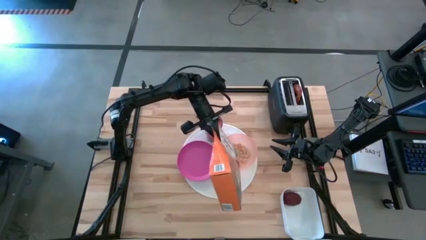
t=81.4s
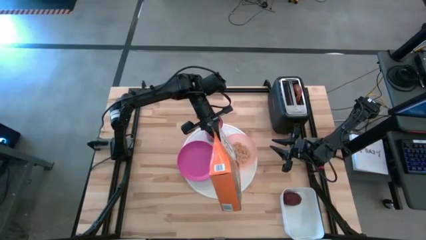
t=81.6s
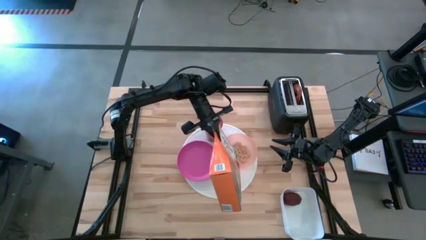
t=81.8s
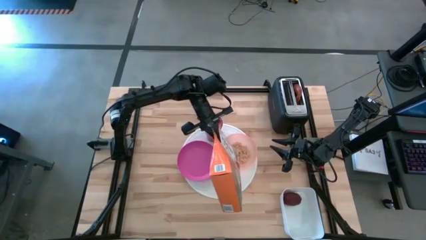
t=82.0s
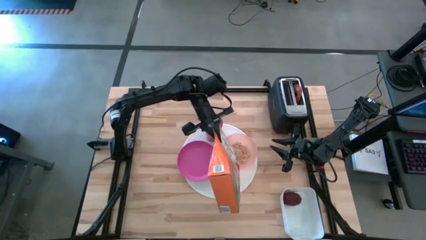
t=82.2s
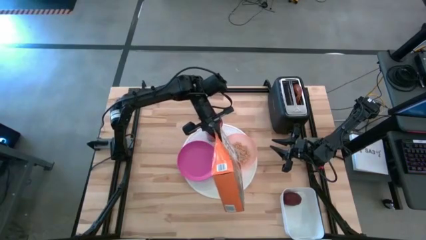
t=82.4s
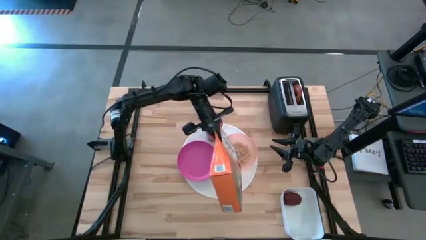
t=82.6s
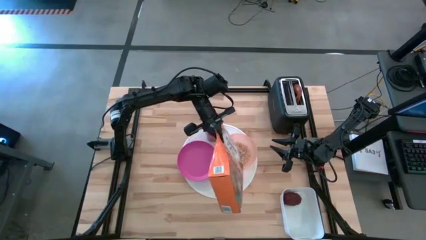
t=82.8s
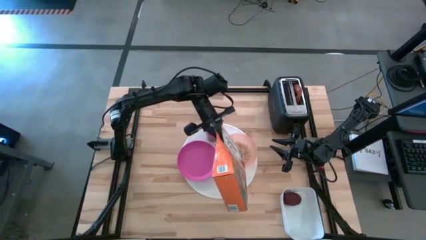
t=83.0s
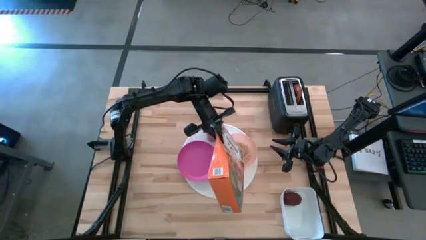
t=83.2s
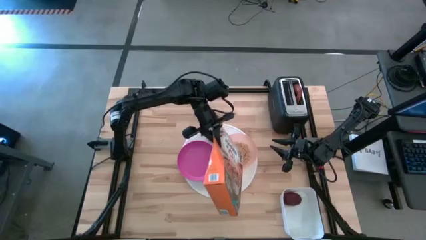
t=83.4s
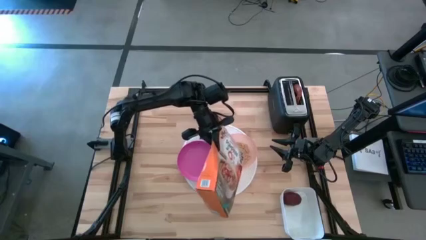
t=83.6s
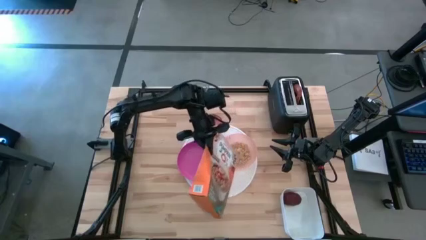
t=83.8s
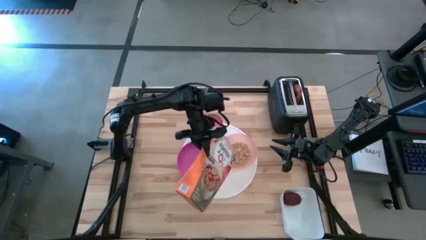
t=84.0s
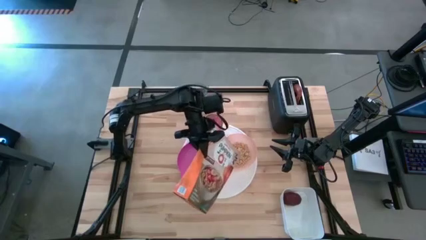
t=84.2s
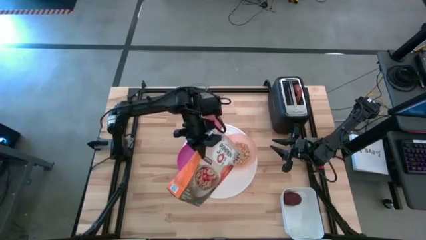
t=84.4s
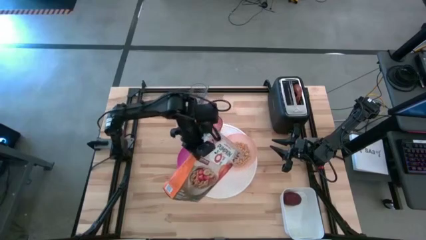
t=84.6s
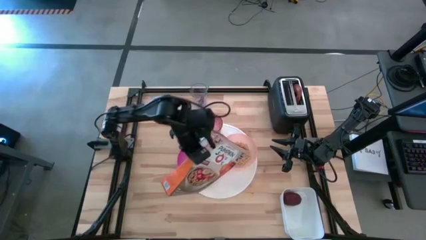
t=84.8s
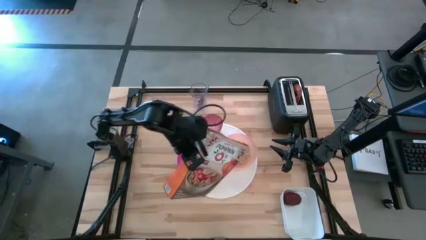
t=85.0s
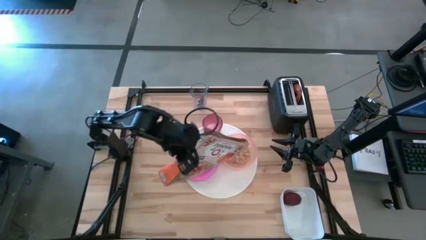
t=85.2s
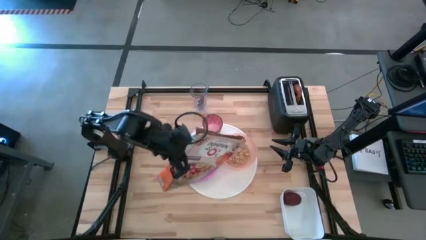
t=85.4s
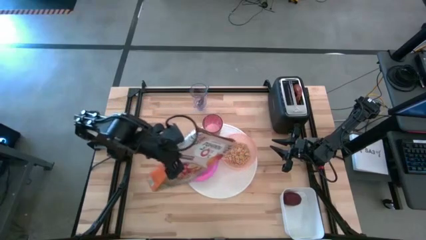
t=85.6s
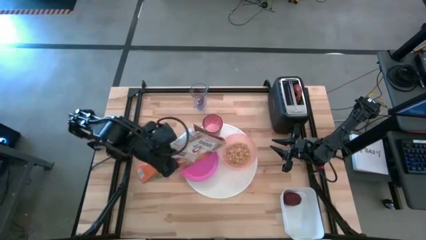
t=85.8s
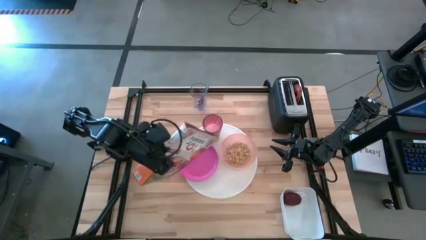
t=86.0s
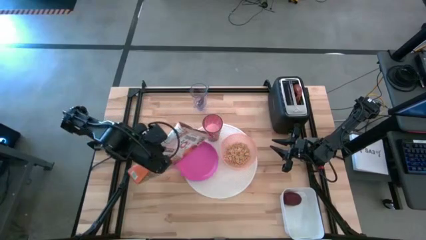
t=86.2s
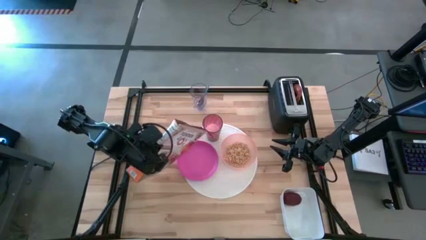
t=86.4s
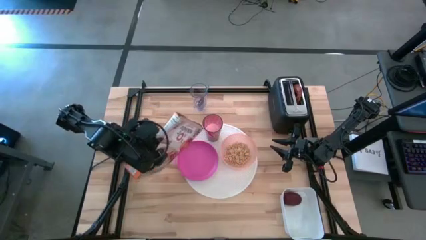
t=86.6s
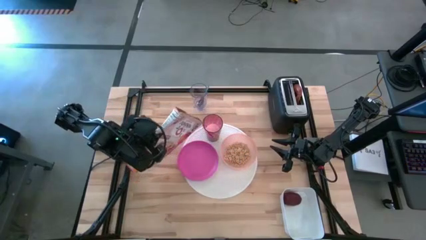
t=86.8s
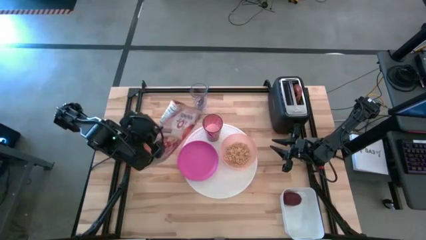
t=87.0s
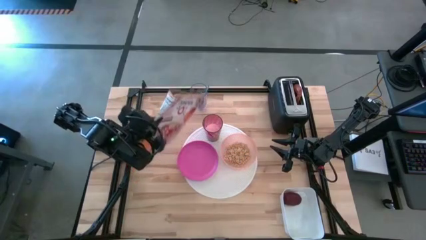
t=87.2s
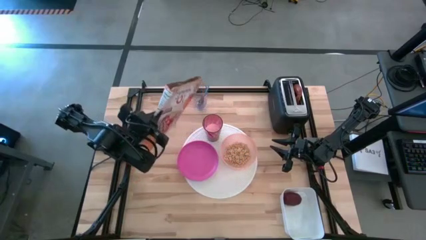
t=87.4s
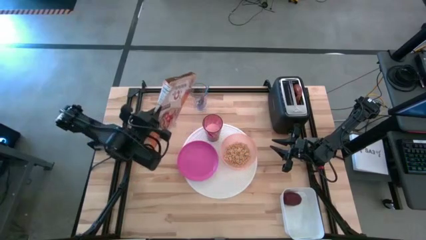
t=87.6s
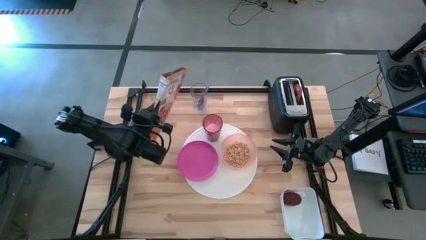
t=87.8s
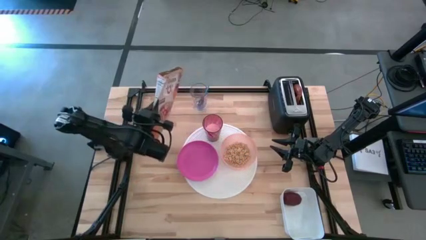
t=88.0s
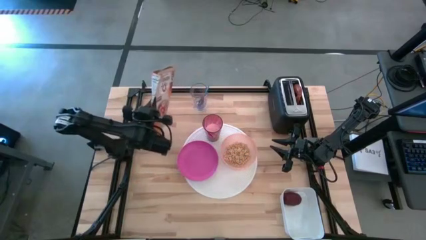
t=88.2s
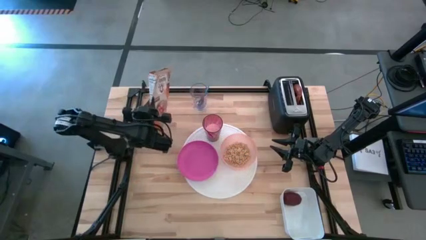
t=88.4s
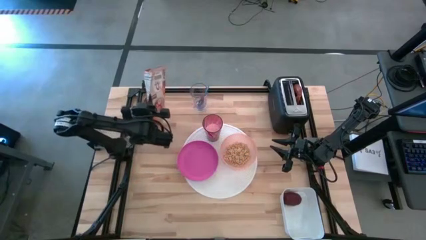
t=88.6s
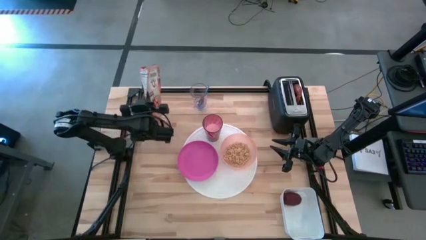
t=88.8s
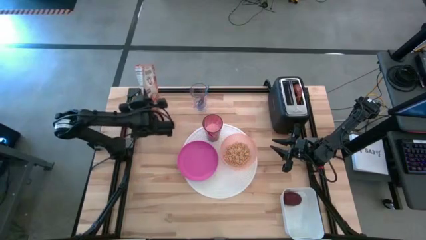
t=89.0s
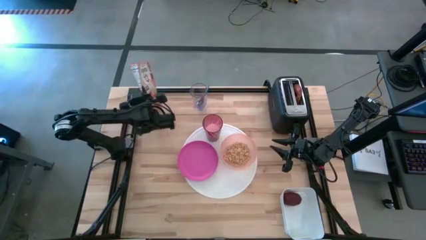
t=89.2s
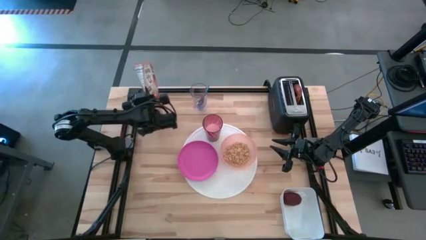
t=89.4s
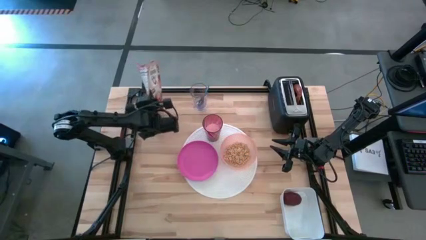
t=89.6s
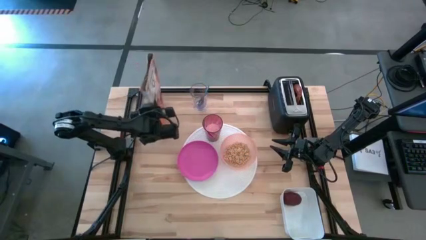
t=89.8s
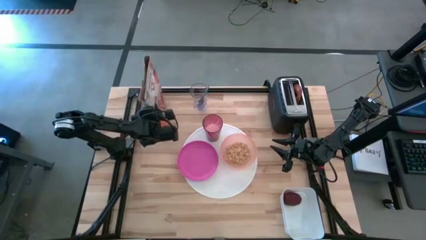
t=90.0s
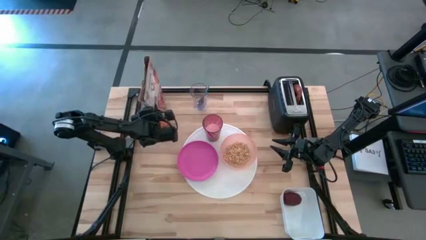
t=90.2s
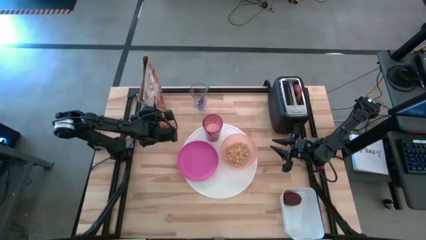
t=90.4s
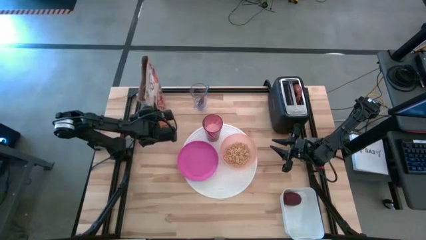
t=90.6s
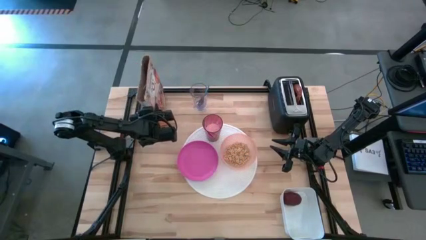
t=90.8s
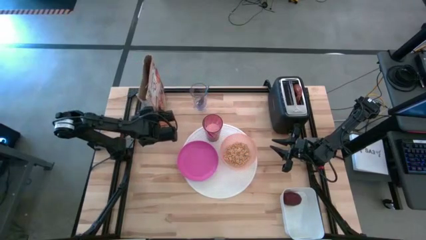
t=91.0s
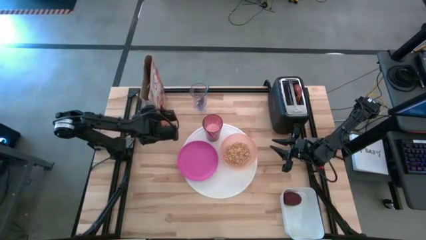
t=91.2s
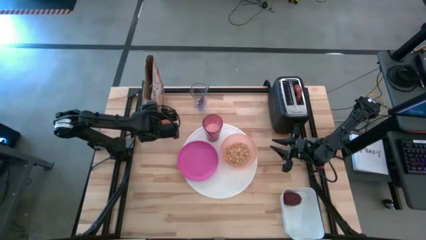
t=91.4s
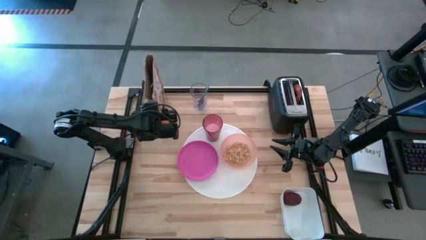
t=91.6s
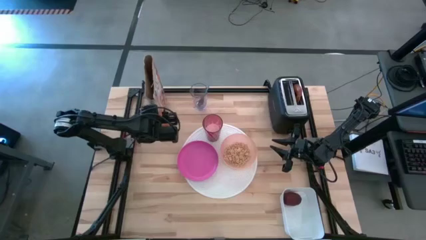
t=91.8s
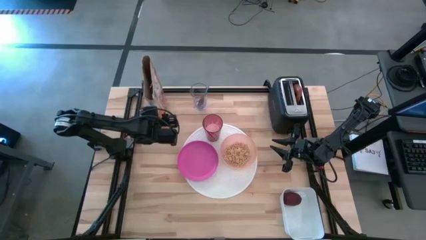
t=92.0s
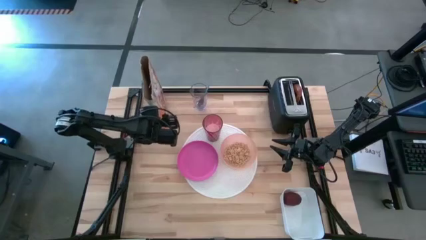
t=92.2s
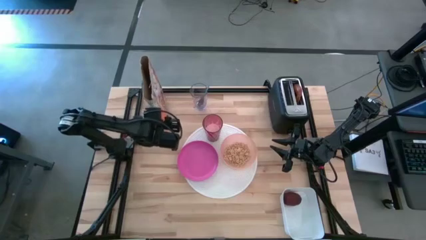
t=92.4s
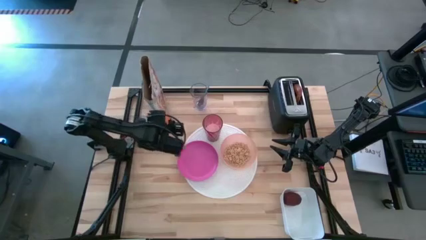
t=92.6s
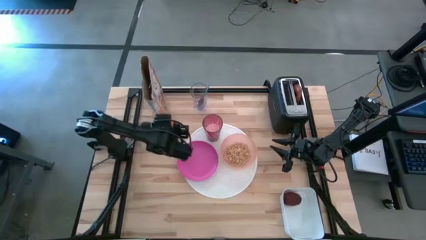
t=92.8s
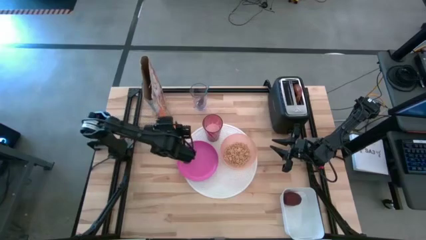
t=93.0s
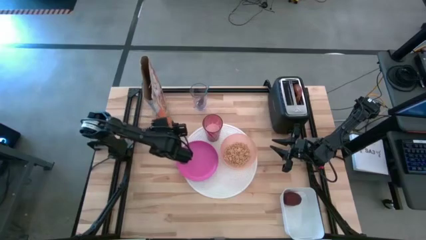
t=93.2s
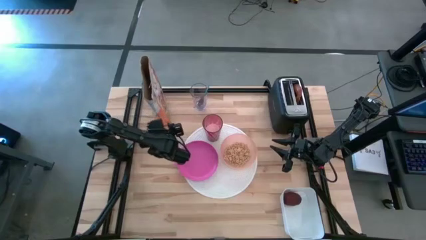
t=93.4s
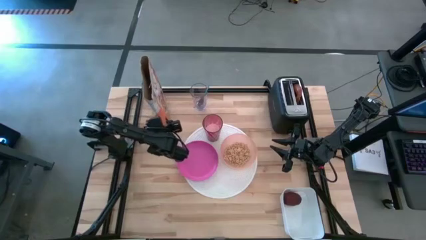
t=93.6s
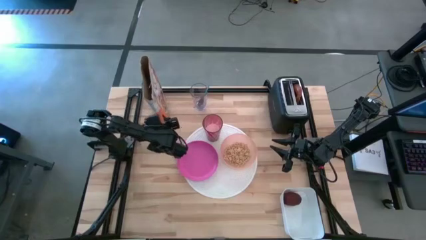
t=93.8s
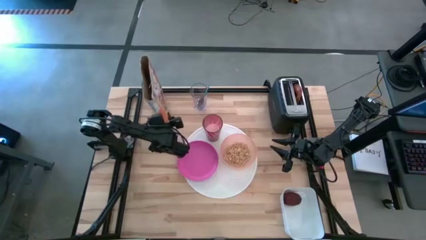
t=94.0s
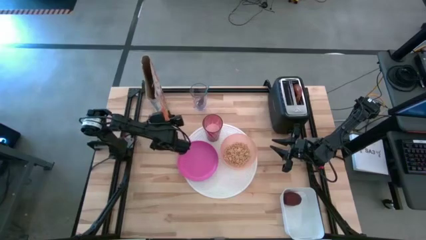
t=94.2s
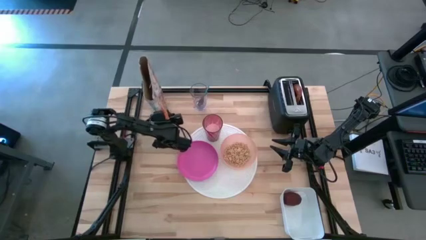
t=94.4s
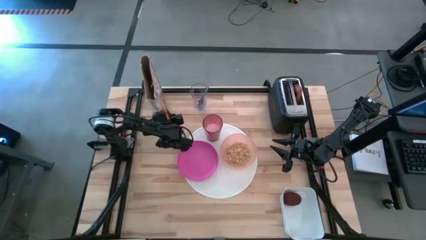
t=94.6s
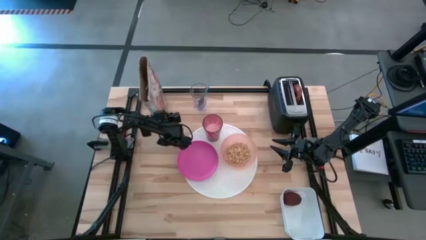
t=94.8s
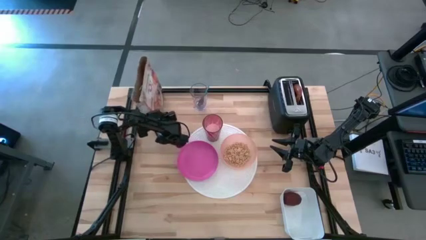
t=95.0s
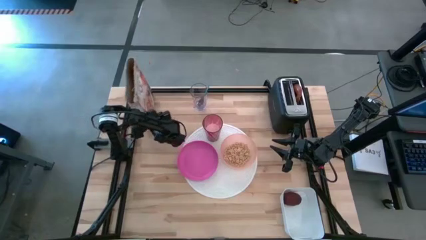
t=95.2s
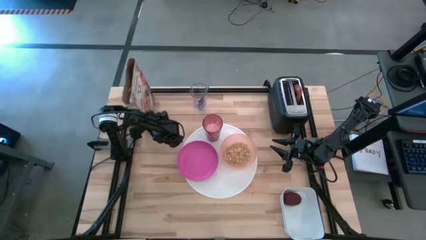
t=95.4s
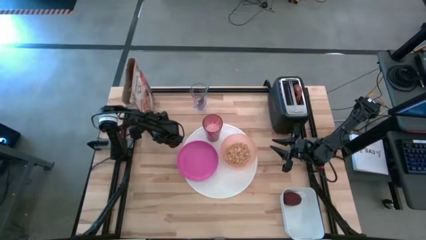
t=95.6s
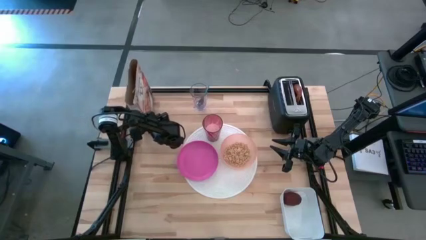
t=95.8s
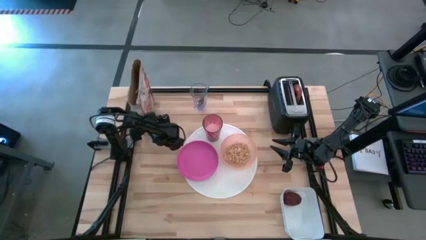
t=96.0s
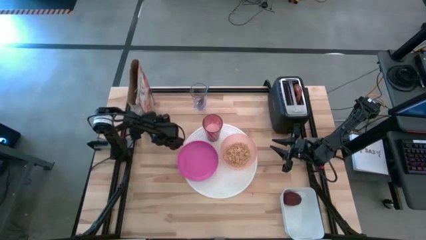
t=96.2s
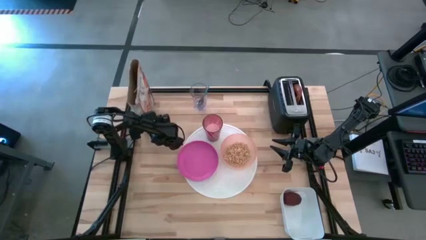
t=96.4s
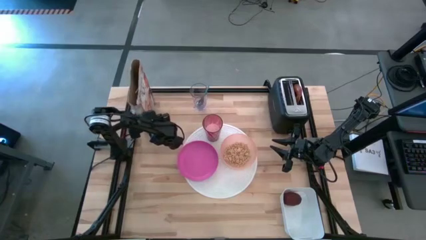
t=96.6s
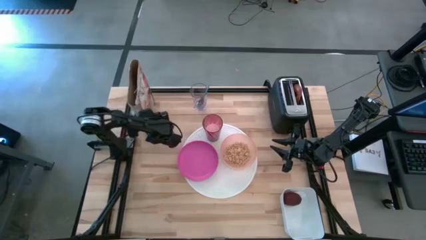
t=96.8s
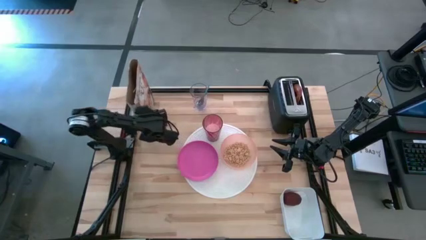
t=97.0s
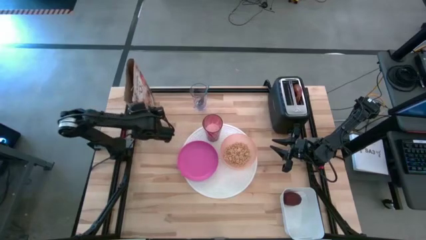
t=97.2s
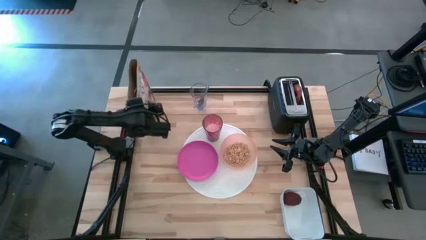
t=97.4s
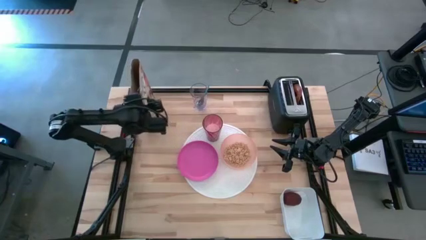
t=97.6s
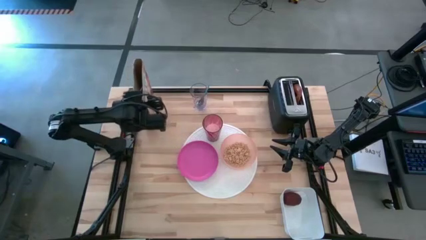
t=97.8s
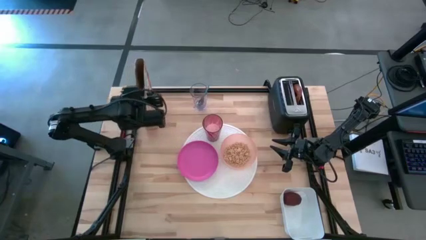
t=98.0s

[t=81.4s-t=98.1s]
Task: Arrange a breakfast setting
Pour the cereal from the cereal box into the orange bowl on the placemat
